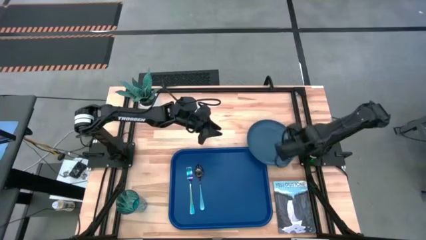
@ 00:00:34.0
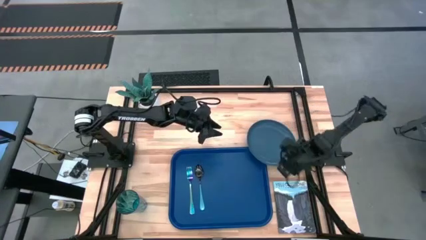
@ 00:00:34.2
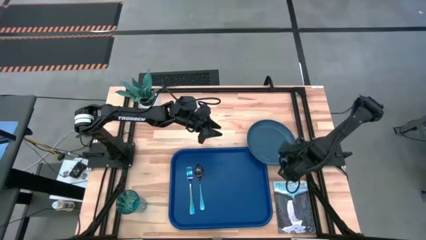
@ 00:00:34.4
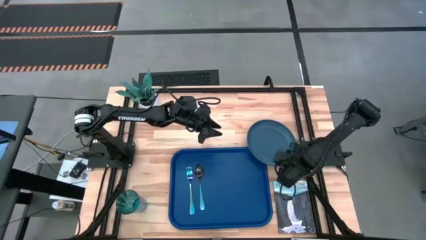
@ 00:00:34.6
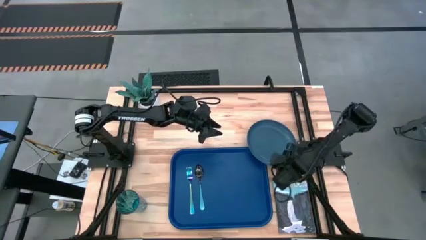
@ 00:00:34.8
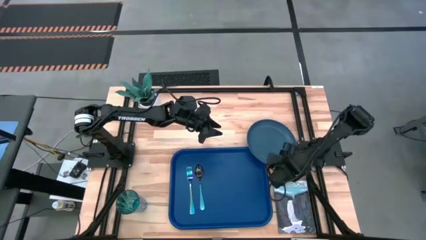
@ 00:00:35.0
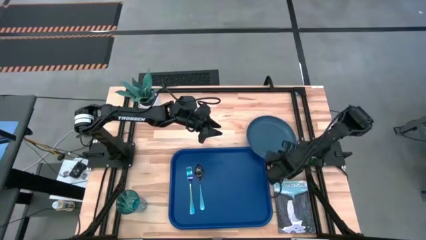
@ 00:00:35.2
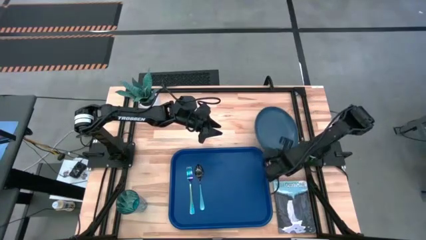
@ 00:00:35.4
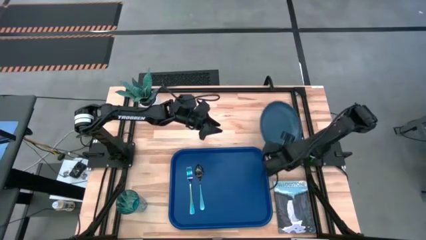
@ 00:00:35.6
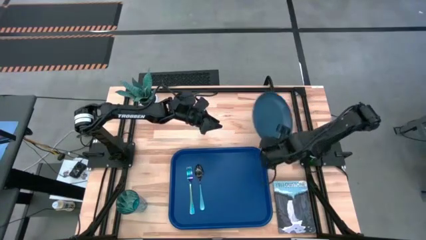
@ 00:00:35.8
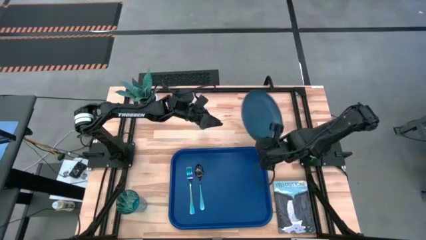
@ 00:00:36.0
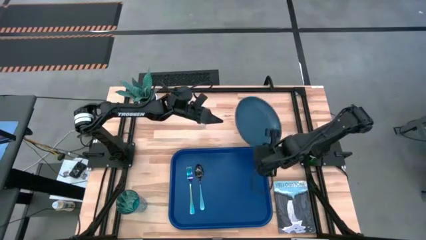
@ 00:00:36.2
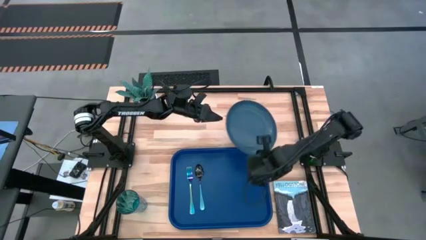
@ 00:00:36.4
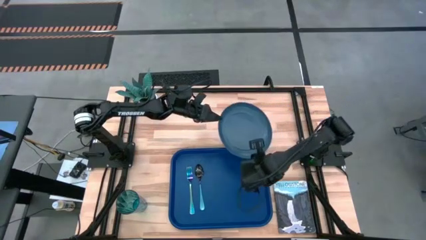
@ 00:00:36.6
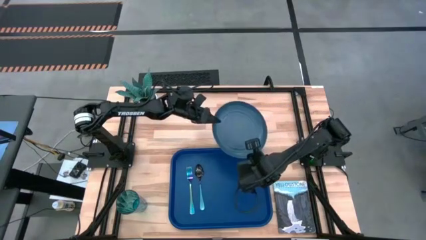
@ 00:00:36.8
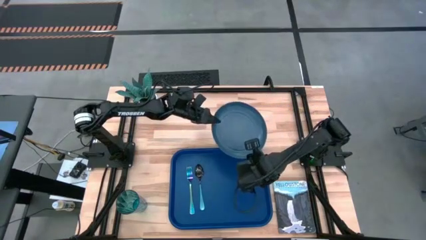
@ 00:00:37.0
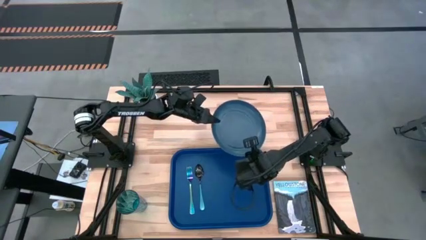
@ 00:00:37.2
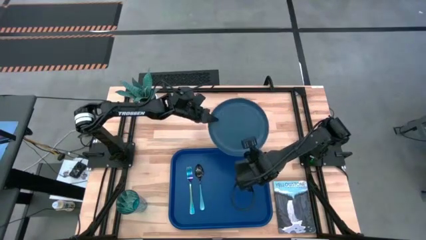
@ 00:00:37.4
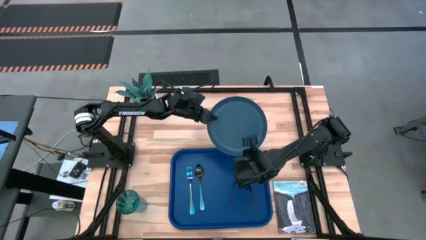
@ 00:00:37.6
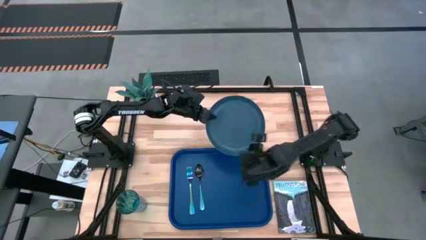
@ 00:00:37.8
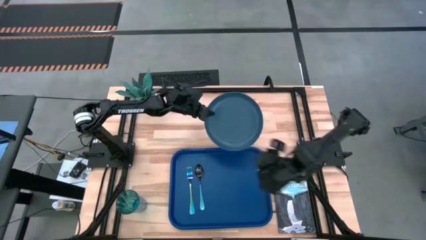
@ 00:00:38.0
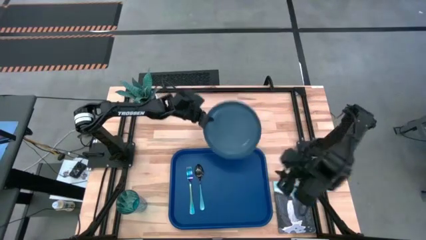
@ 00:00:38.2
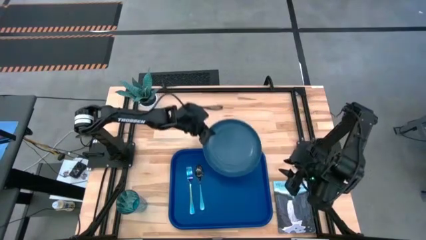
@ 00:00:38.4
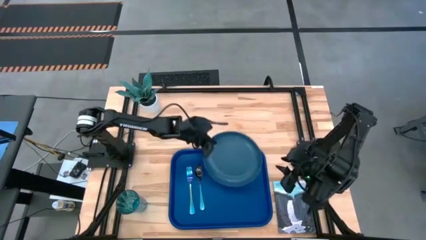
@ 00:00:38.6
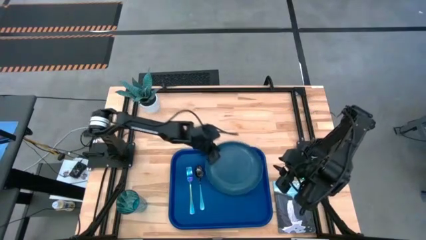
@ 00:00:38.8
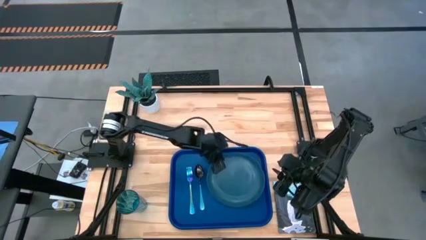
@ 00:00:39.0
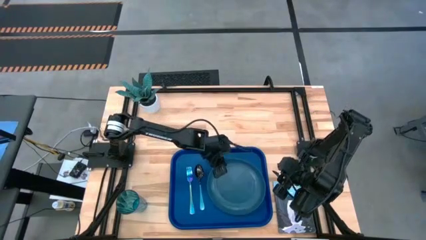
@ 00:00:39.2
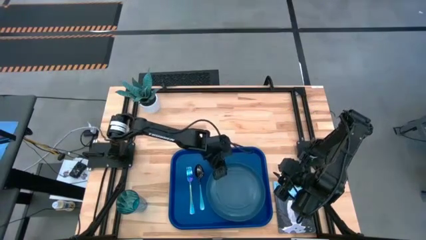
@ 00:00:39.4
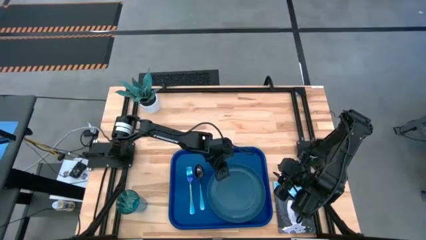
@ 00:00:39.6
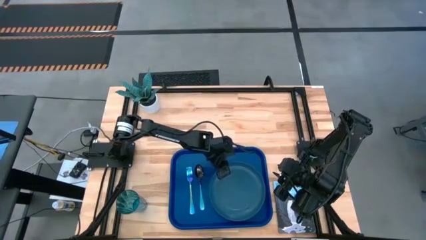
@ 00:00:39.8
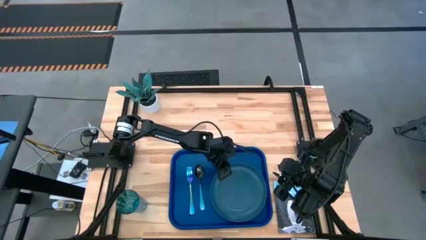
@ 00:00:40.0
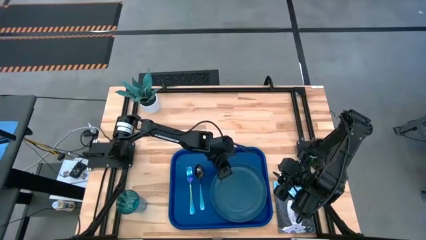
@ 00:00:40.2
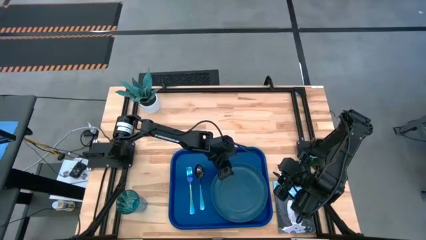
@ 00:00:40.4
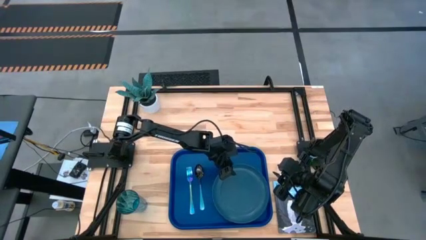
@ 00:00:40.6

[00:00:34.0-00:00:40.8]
Task: Pick and place plate/cup/fork/spoon on tray
Put the blue plate on the blue tray

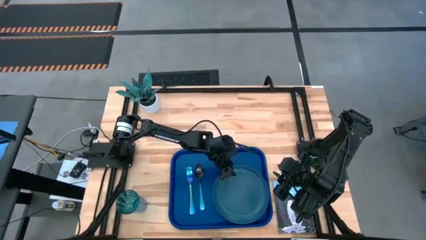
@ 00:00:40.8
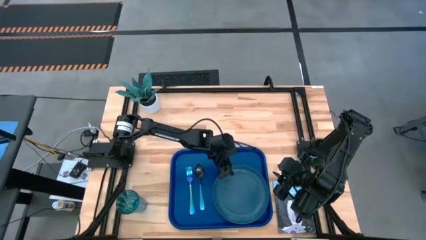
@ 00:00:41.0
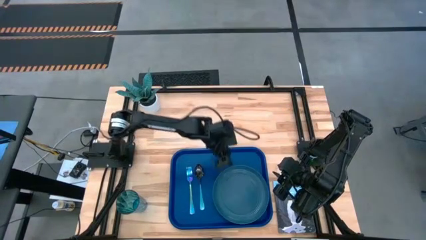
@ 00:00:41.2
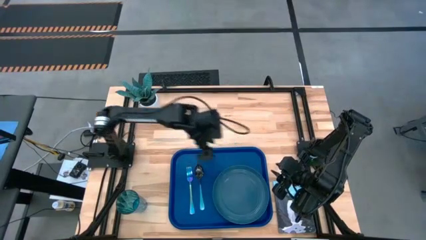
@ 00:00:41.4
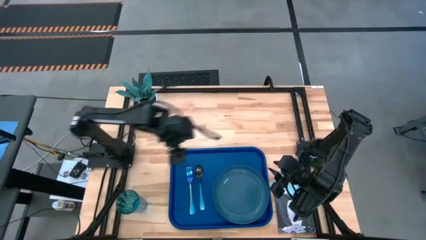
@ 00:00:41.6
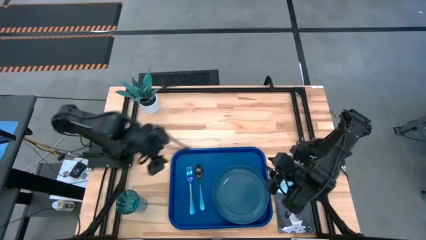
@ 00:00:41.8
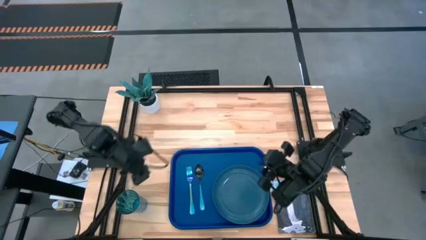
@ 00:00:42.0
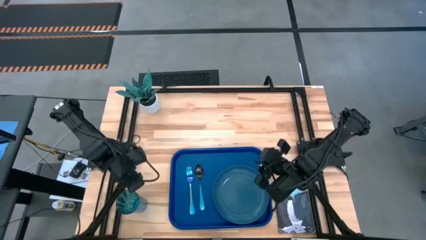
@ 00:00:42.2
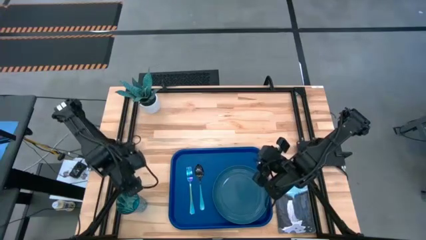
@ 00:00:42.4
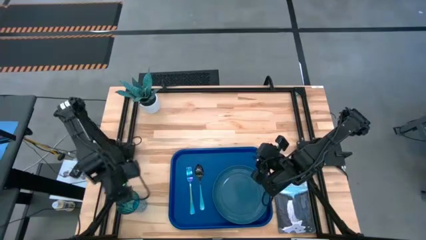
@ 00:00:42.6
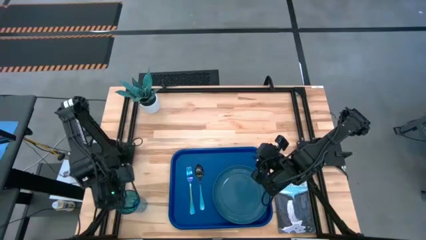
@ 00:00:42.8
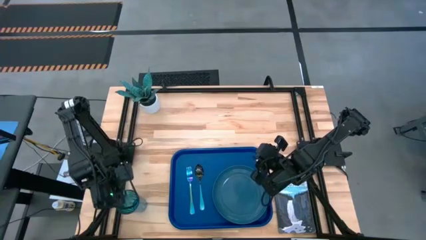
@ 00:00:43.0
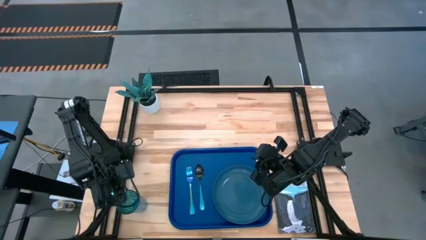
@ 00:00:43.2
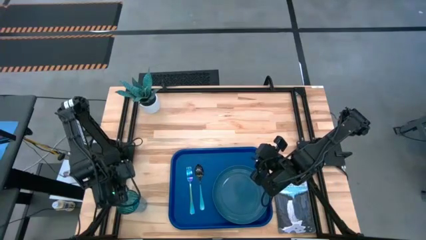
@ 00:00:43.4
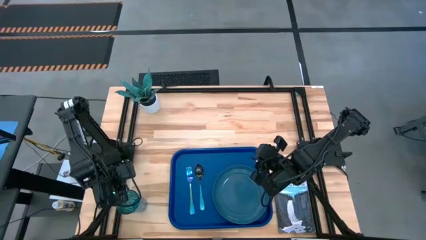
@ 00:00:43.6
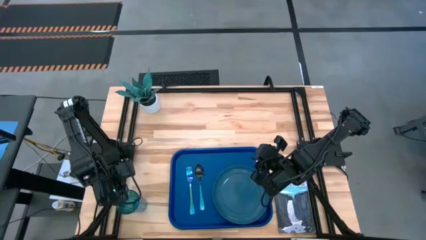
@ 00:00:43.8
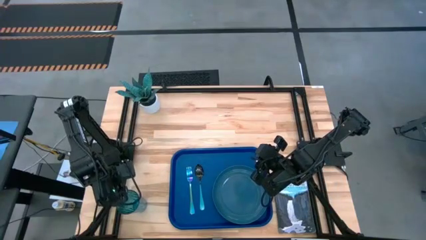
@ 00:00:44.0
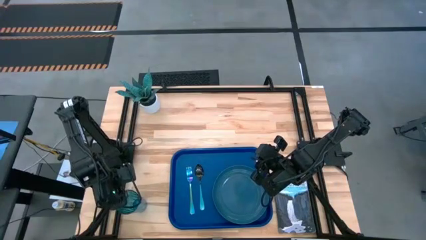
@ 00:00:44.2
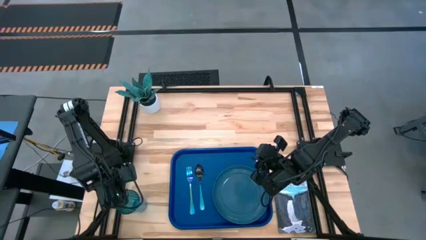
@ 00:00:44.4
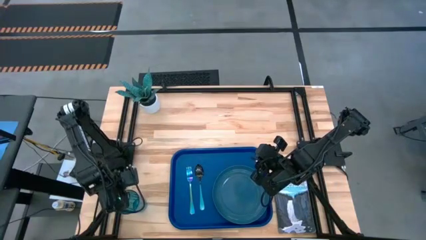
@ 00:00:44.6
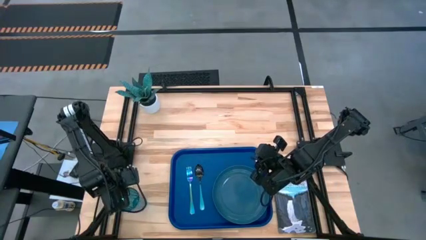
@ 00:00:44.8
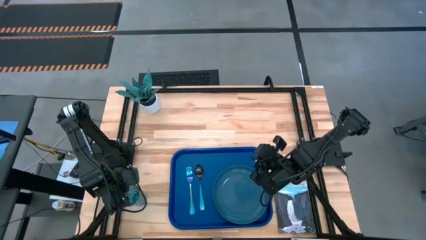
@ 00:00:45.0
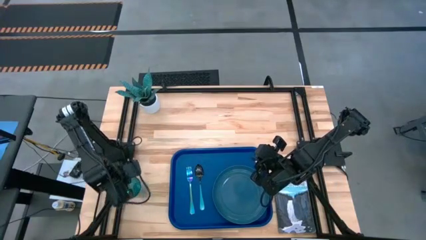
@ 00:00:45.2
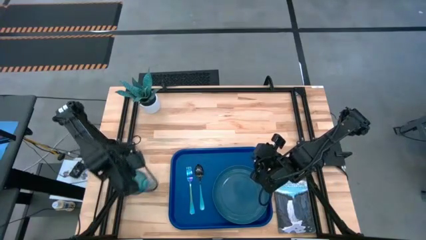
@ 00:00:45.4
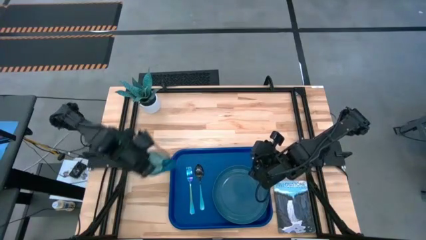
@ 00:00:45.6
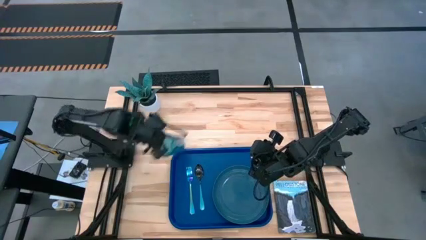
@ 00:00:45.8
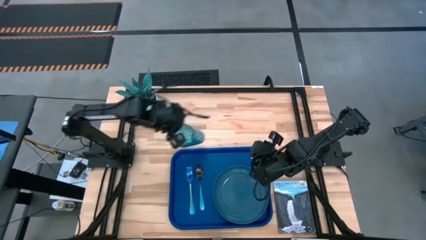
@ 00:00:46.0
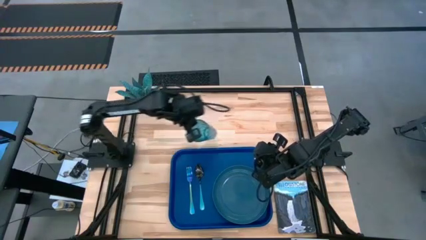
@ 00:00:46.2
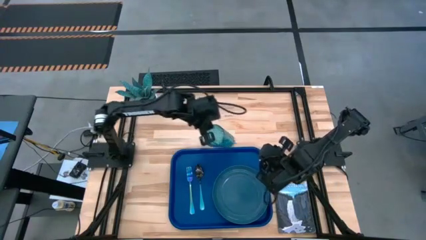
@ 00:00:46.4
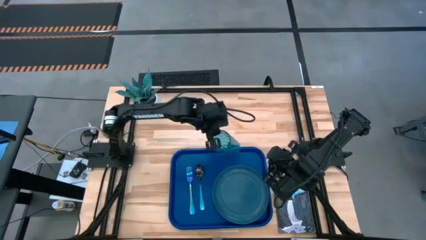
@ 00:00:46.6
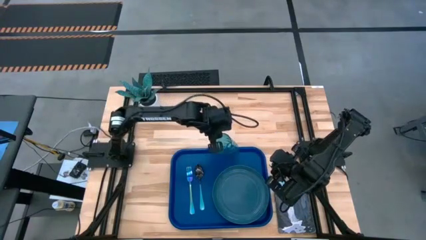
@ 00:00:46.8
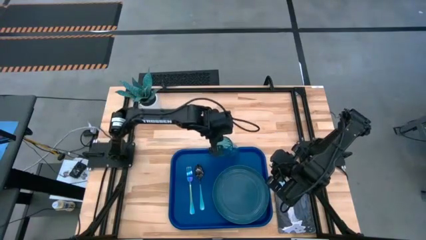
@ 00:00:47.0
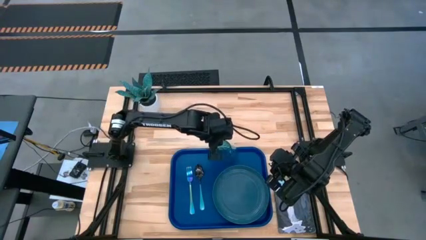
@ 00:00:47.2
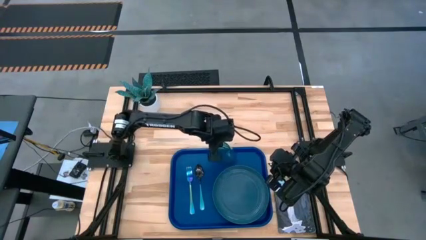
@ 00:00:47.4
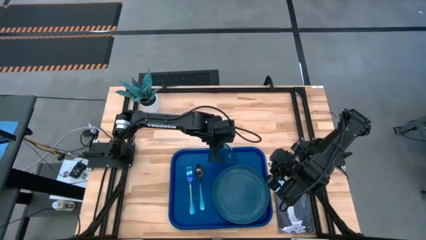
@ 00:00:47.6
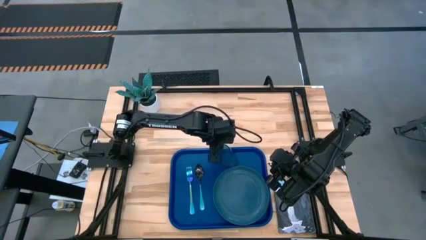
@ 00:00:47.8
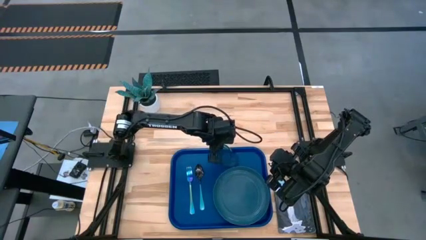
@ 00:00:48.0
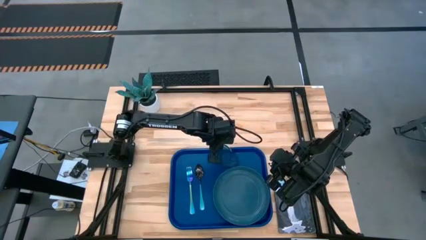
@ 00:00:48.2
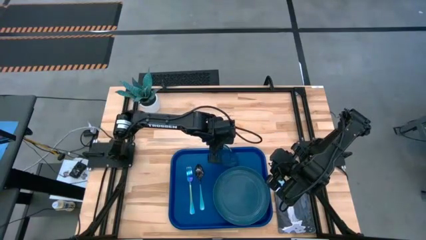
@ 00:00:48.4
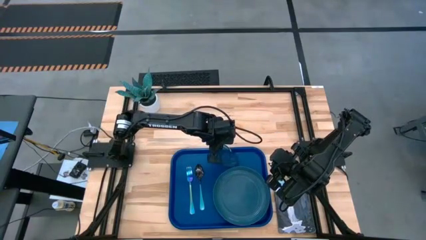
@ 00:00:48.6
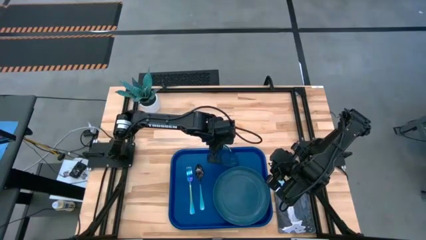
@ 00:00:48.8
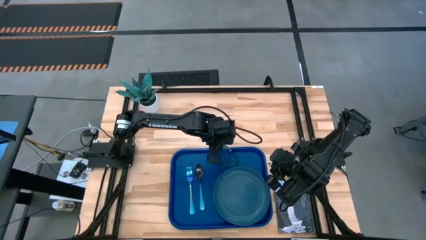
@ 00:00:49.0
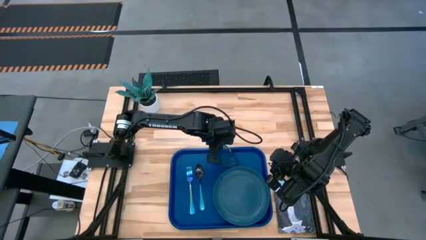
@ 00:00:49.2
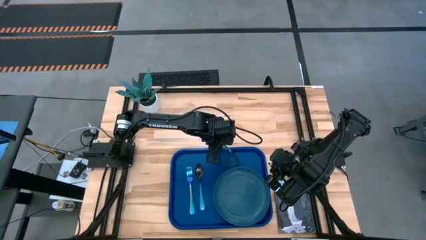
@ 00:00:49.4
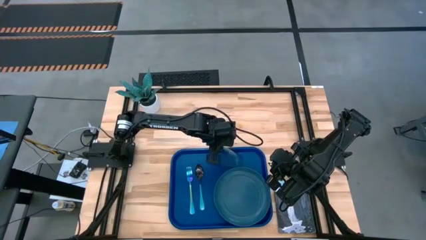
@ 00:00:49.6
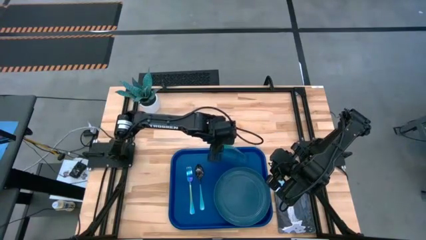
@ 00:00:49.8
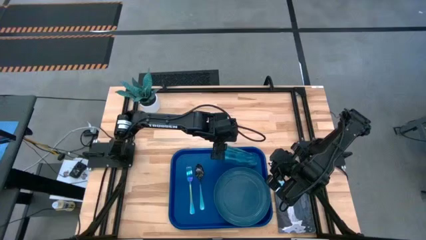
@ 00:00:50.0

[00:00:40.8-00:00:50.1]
Put the blue cup on the blue tray
